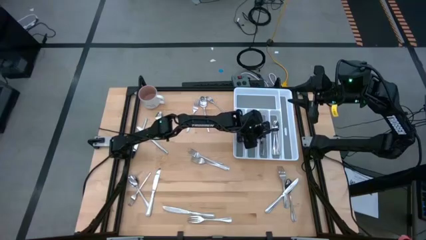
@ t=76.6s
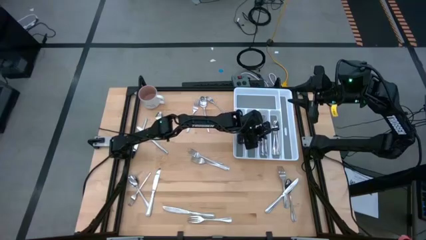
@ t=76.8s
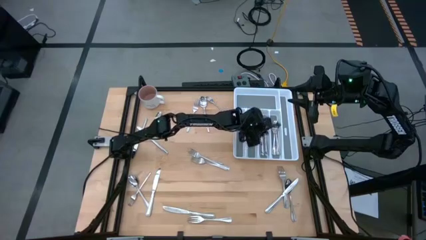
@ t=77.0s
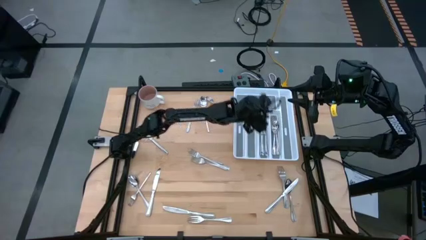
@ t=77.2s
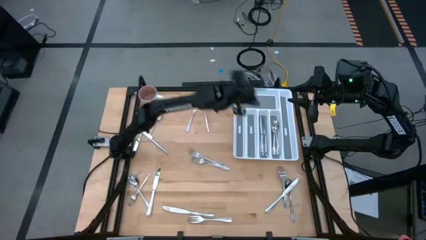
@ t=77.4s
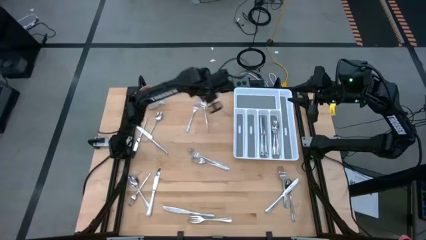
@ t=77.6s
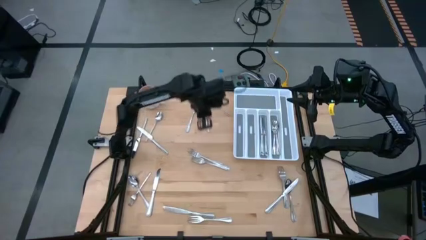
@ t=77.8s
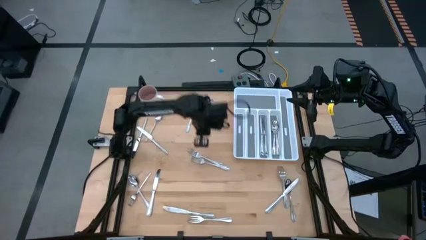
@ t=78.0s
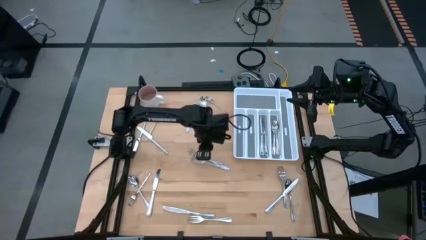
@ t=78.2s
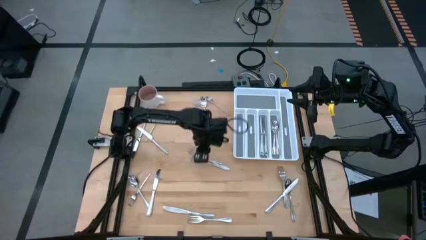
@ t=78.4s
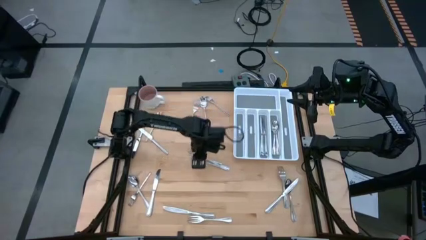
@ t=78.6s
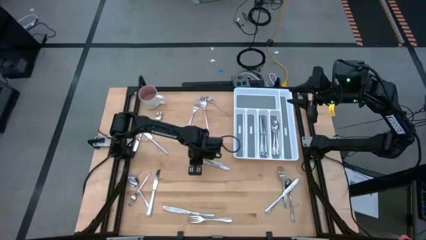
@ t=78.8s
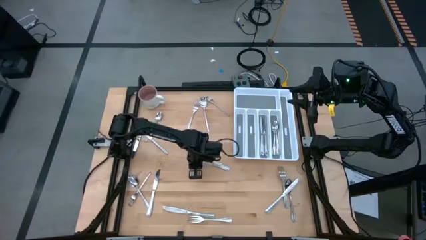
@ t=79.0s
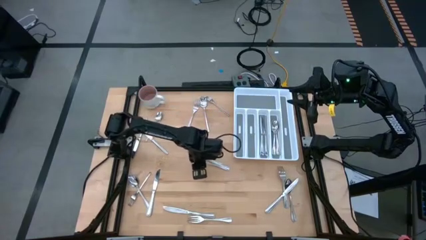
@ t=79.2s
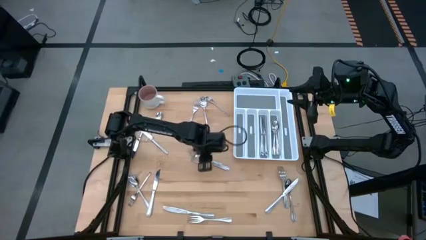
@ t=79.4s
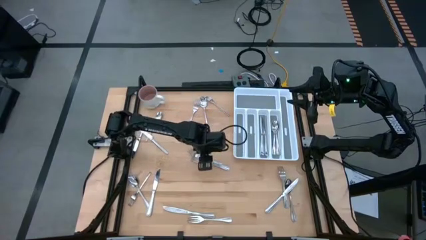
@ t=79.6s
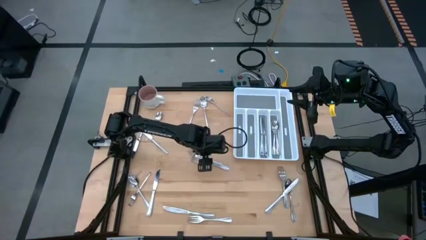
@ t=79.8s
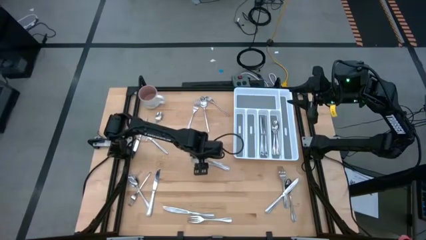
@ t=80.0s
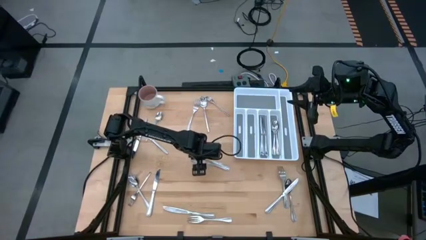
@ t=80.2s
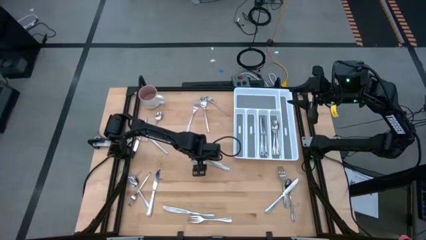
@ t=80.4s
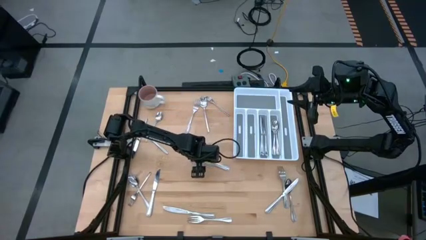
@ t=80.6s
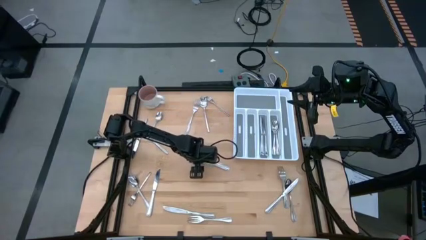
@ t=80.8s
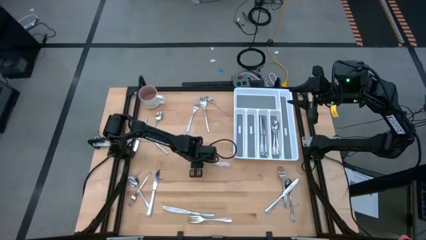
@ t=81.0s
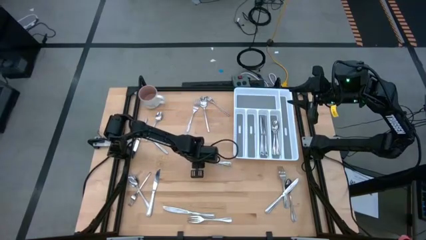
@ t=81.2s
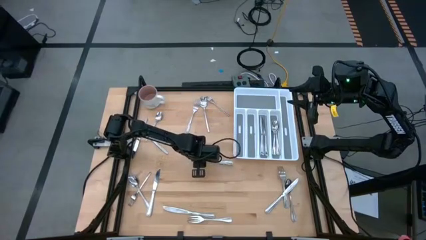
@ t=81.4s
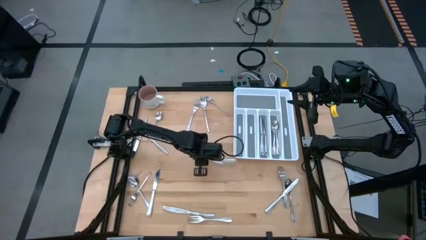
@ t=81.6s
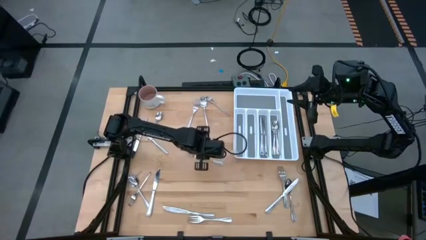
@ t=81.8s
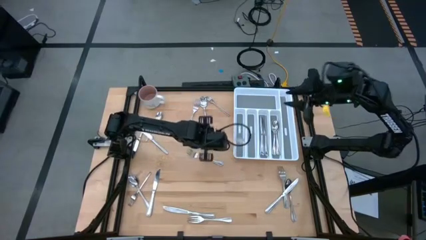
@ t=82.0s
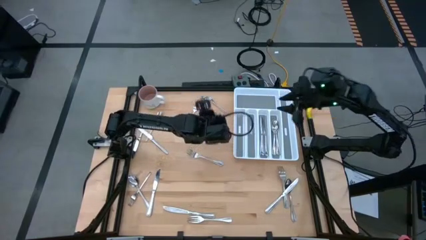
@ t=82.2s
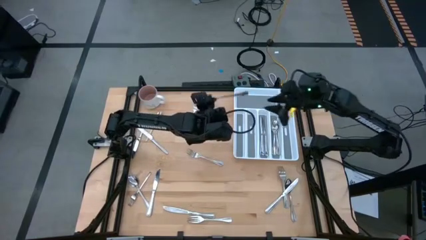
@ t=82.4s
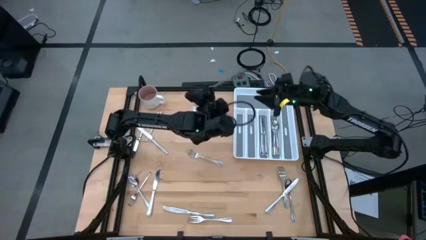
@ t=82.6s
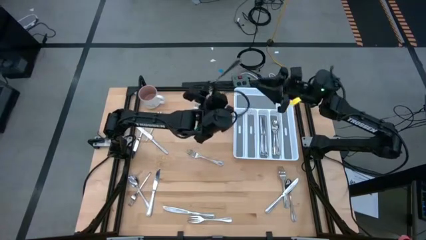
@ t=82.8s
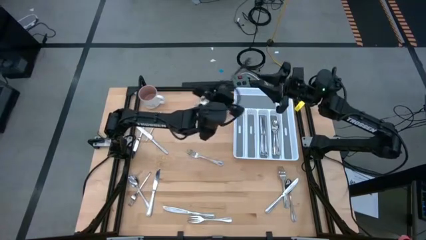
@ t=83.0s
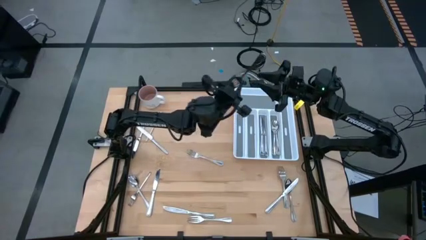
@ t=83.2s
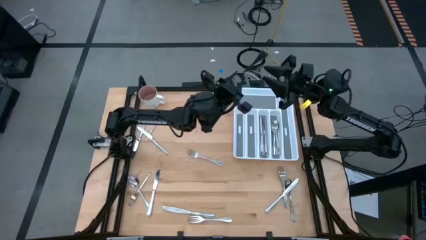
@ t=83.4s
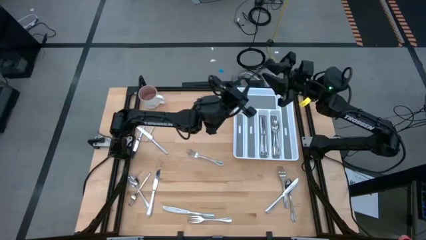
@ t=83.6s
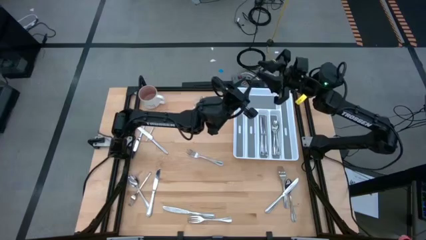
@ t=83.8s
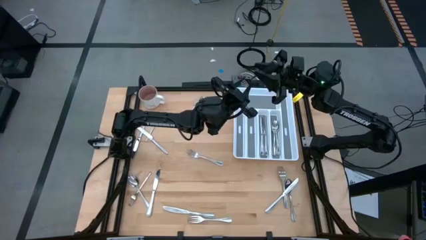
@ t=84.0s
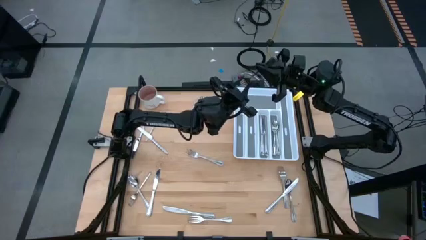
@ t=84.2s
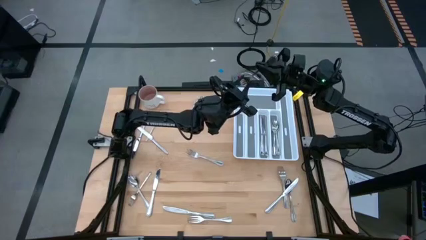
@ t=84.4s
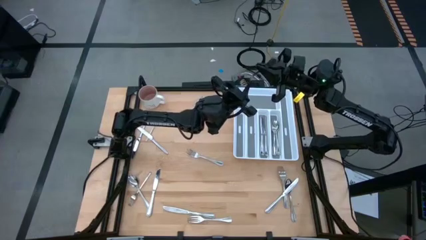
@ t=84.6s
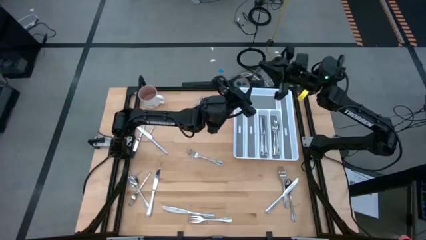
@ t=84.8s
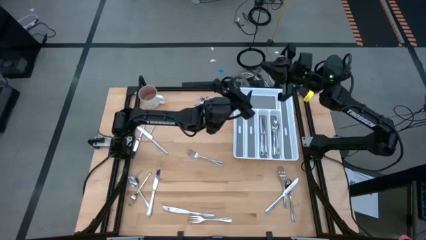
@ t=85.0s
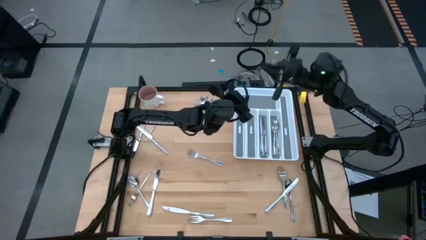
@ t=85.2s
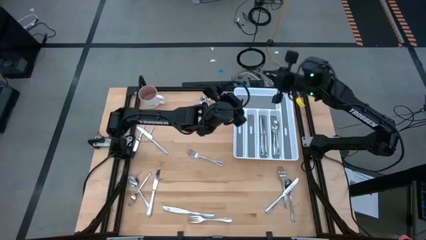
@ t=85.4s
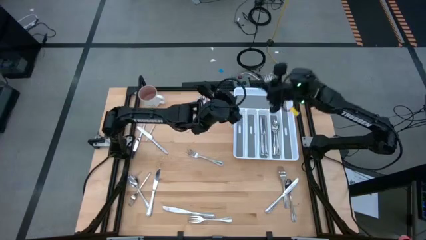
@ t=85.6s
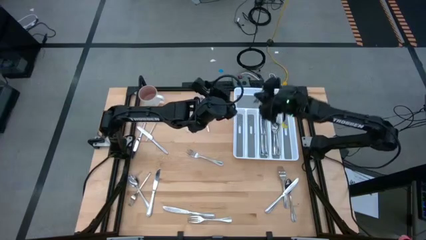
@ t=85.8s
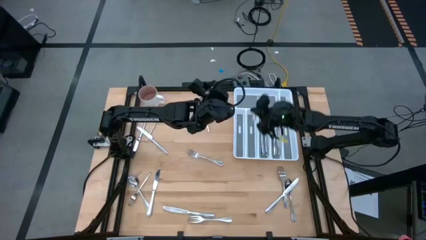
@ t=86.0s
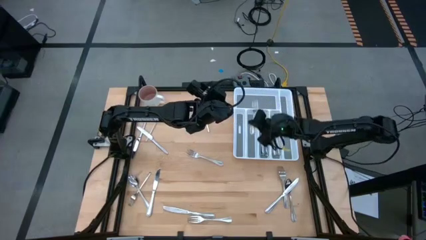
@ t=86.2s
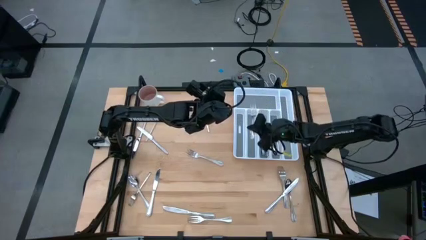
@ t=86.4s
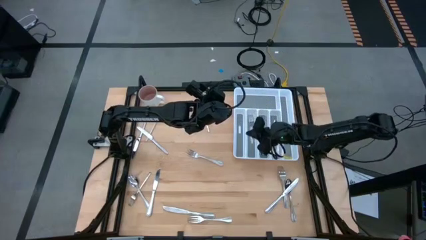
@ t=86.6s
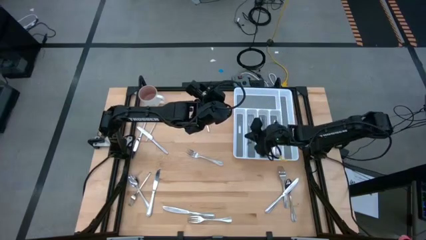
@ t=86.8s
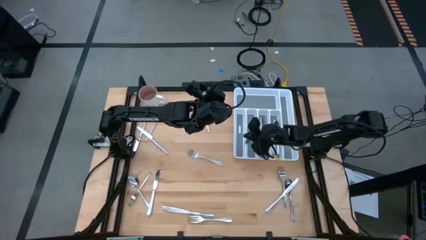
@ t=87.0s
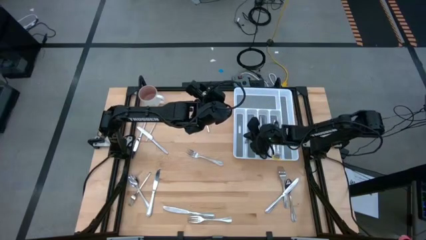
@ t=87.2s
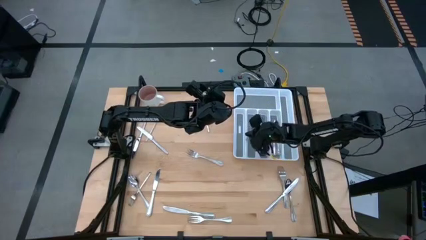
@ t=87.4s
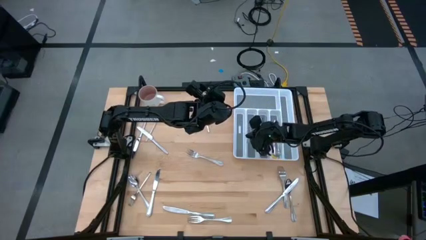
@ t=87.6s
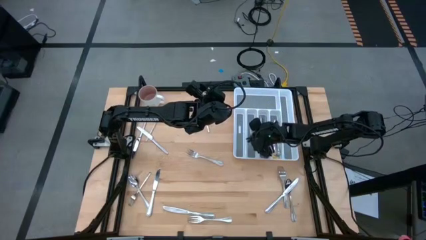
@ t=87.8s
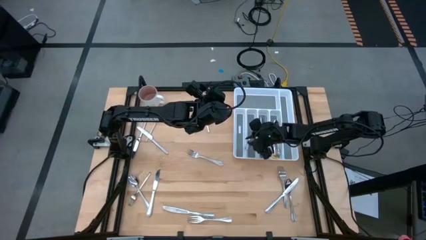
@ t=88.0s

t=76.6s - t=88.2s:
Task: Sort silverware
Put the silver fork into the silverware tray

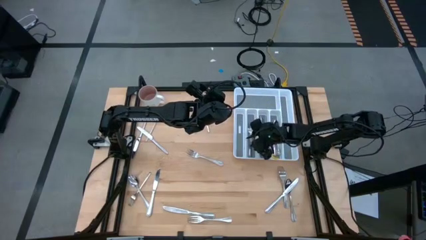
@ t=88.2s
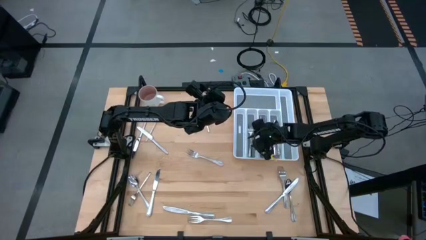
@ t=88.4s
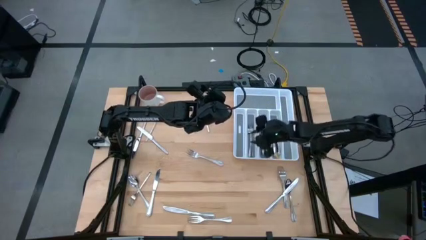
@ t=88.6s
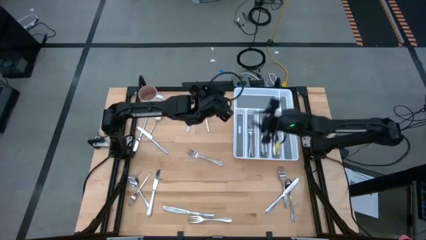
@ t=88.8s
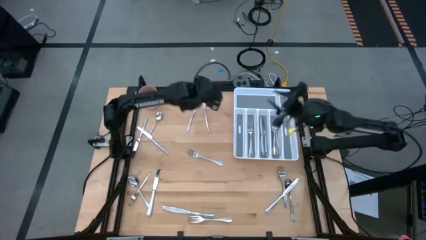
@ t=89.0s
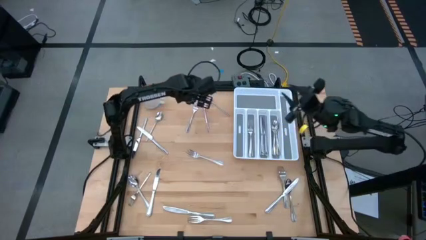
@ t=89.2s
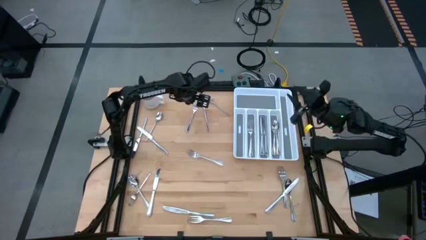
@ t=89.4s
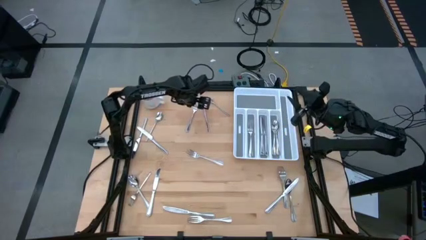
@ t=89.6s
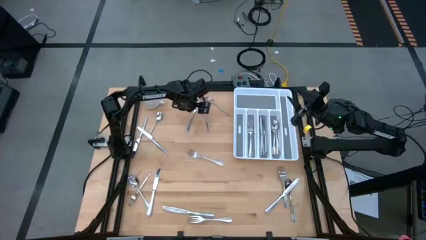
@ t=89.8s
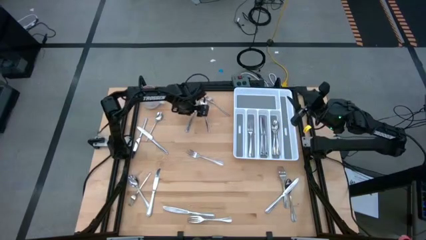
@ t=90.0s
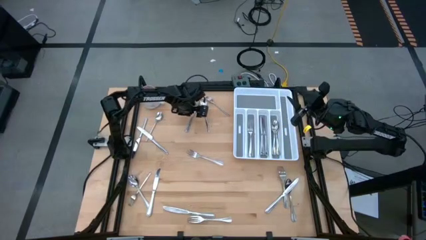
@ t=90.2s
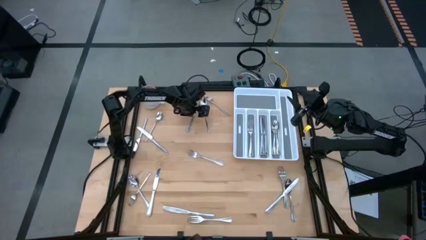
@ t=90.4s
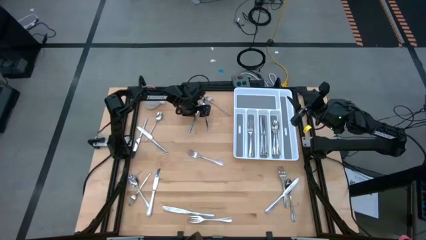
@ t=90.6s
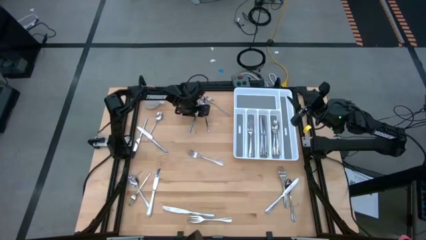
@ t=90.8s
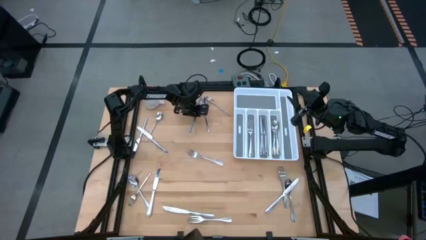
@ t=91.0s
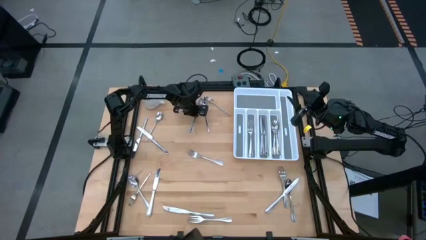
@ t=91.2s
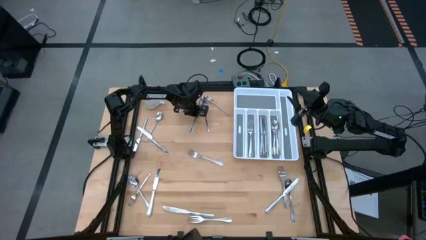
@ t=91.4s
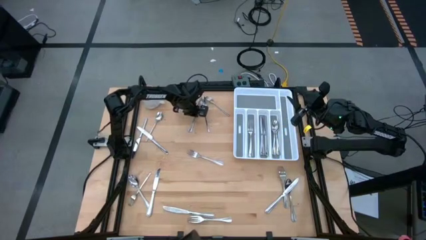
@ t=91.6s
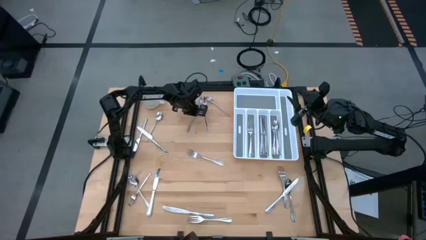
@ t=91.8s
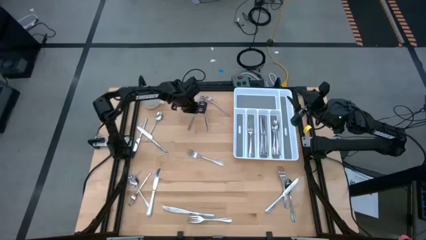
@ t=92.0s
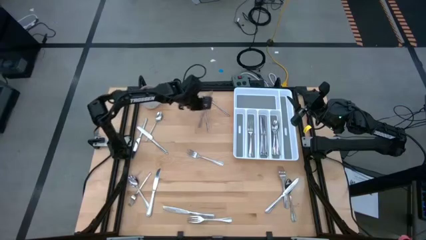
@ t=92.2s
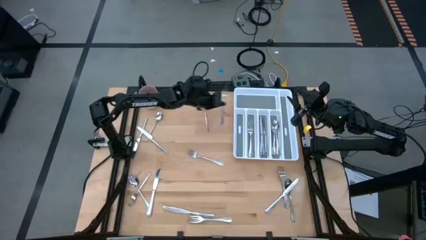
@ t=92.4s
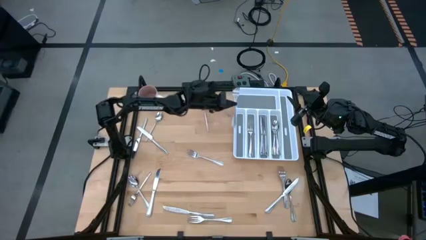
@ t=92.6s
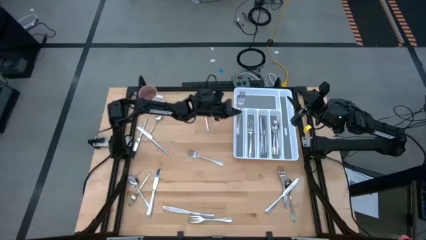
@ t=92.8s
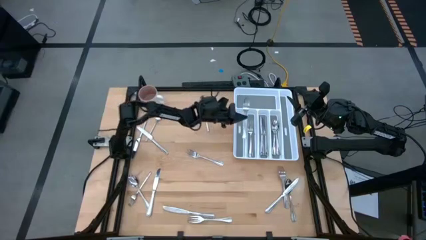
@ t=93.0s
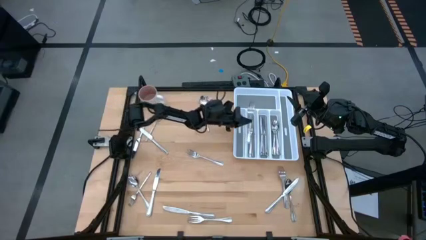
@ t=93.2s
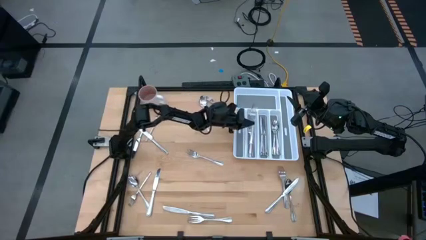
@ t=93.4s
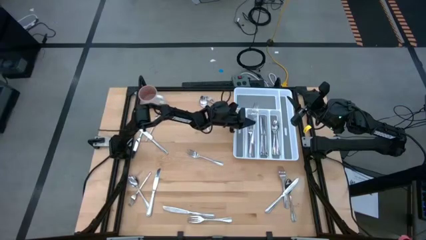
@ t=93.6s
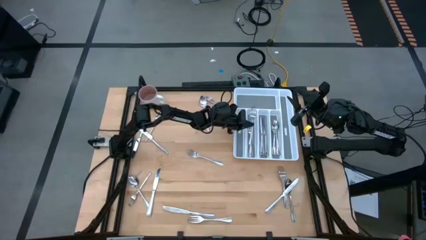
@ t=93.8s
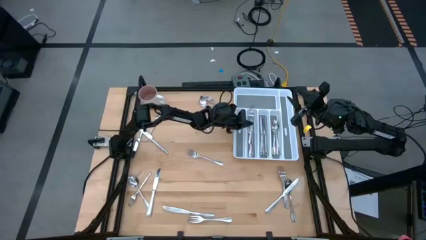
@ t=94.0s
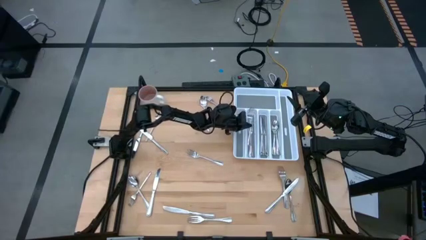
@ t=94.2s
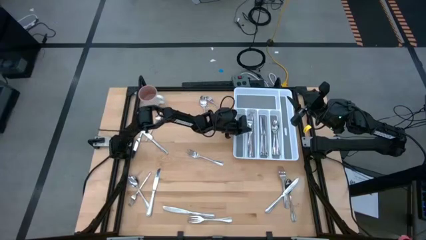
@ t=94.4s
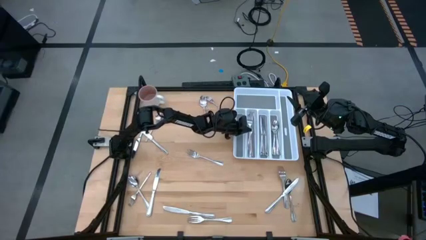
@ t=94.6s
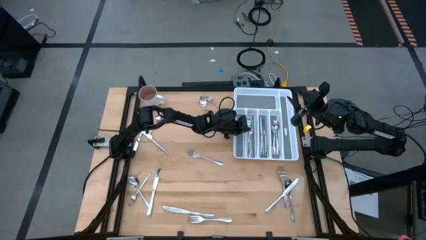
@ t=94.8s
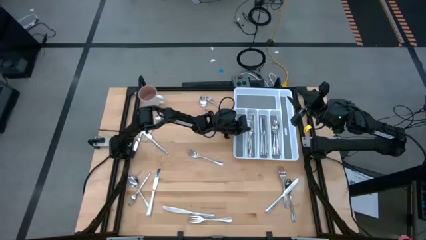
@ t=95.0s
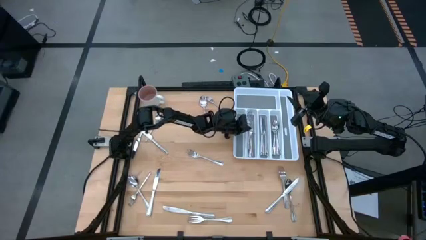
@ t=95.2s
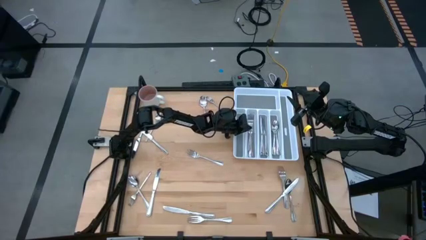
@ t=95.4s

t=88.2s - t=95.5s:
Put the silver fork into the silverware tray
